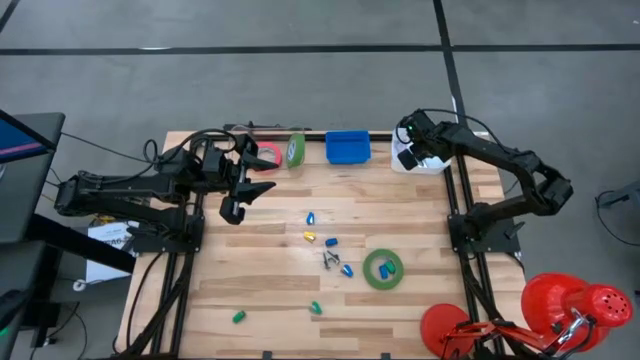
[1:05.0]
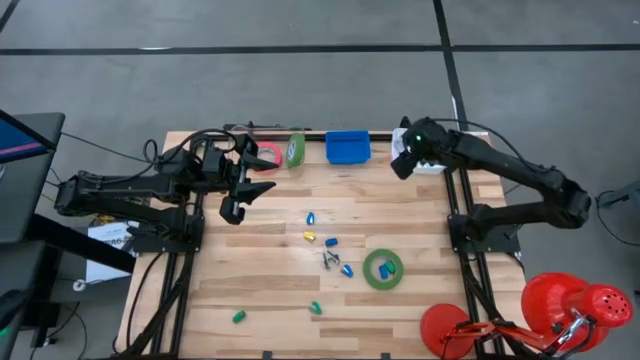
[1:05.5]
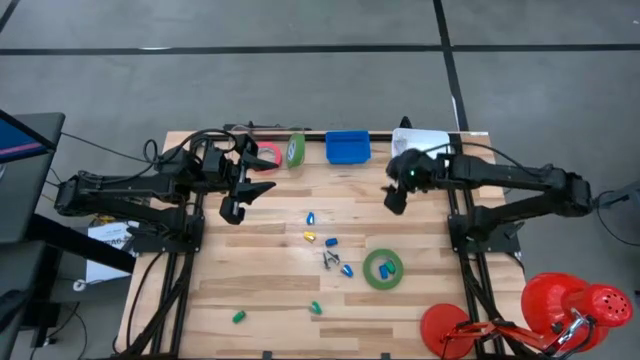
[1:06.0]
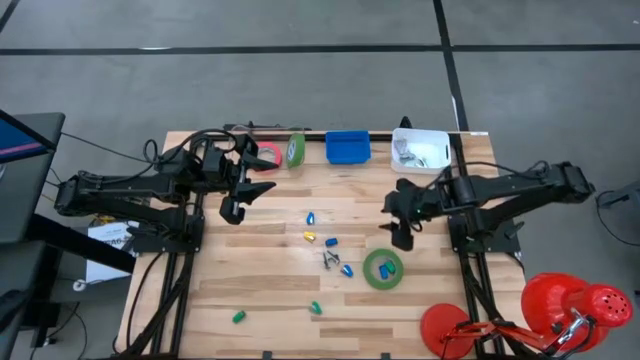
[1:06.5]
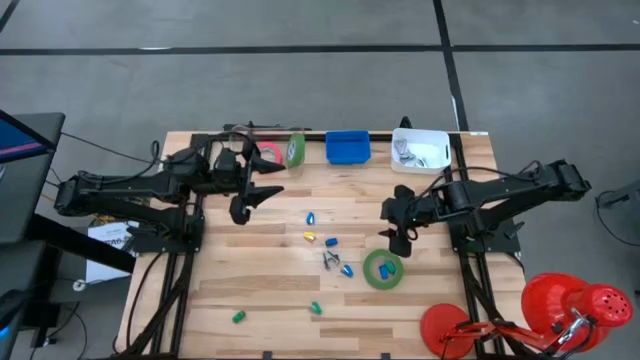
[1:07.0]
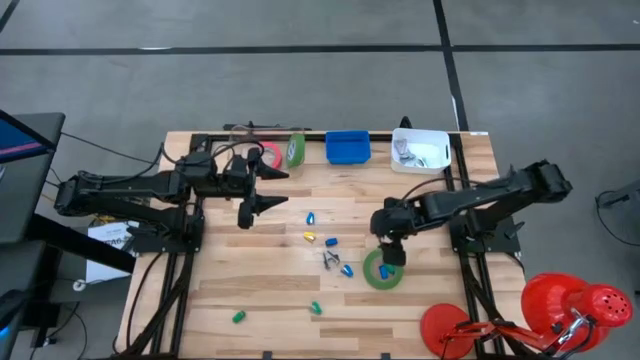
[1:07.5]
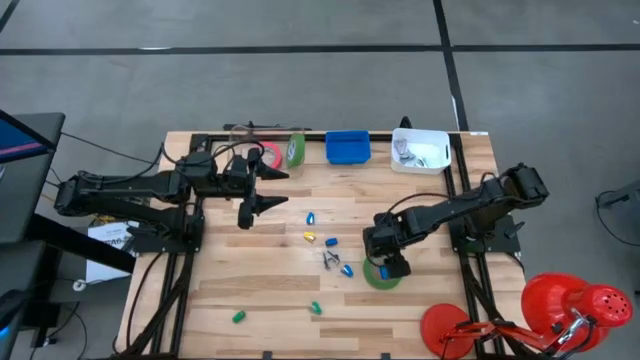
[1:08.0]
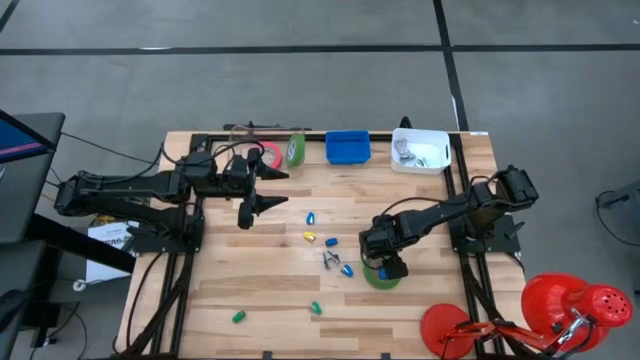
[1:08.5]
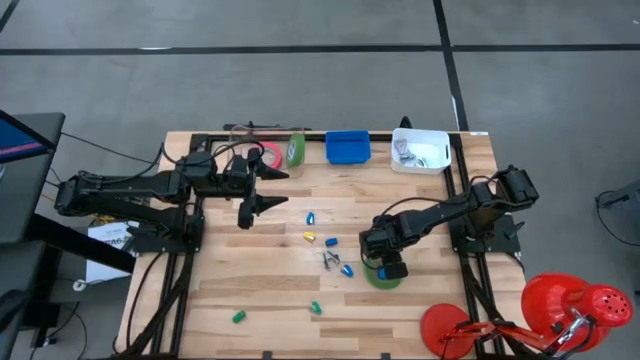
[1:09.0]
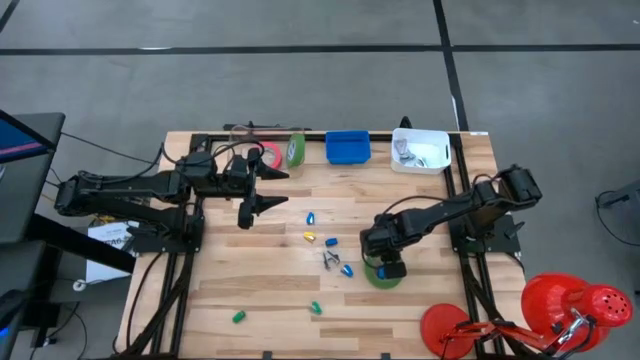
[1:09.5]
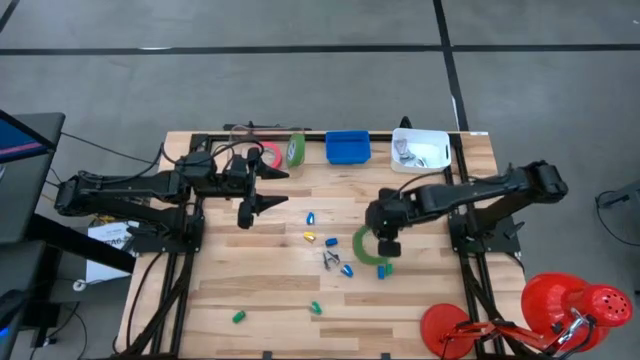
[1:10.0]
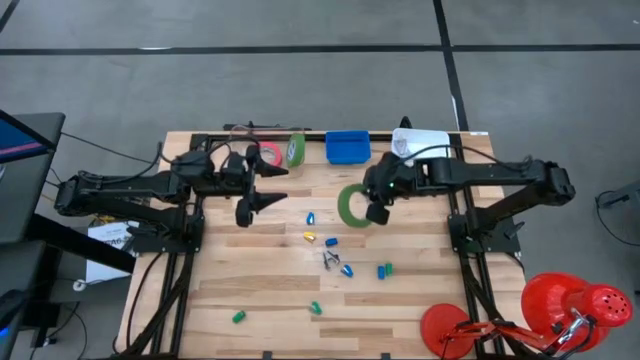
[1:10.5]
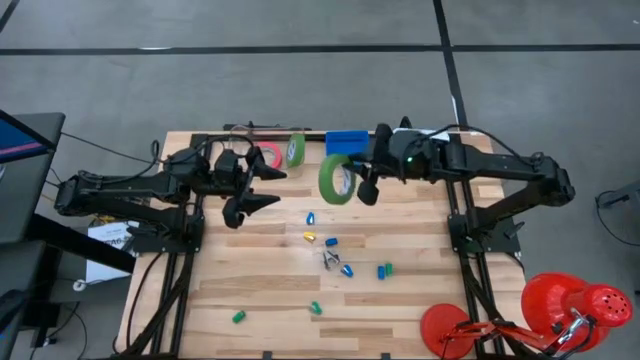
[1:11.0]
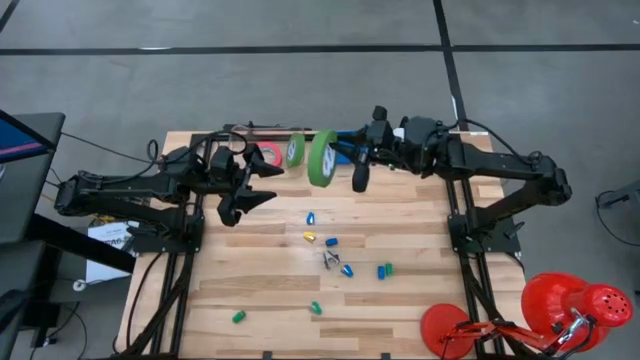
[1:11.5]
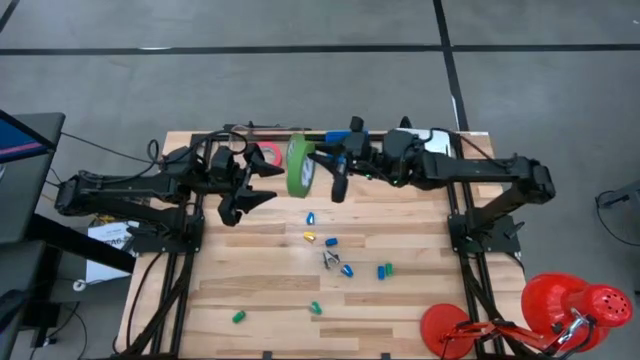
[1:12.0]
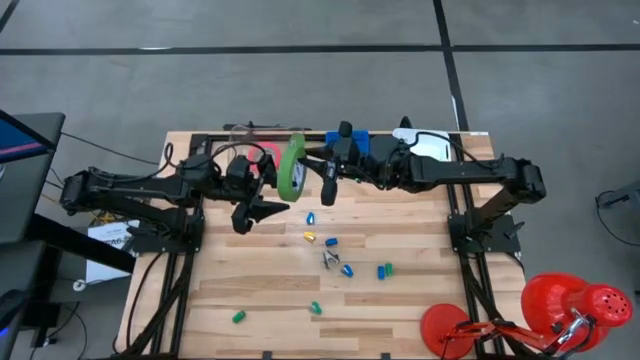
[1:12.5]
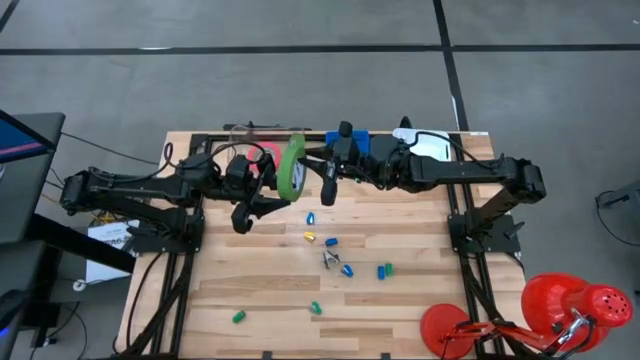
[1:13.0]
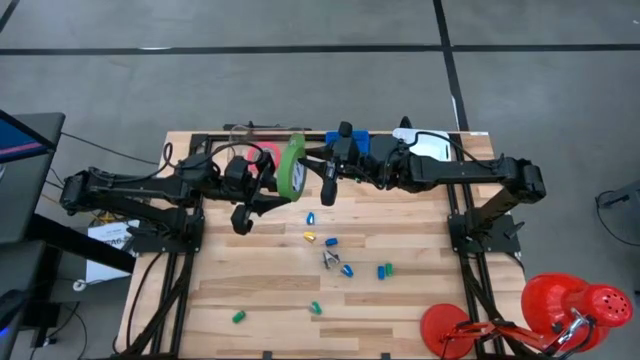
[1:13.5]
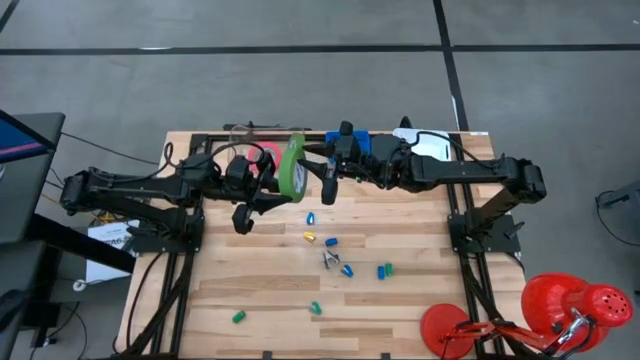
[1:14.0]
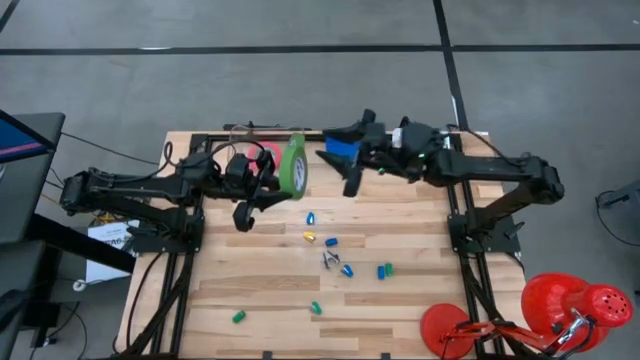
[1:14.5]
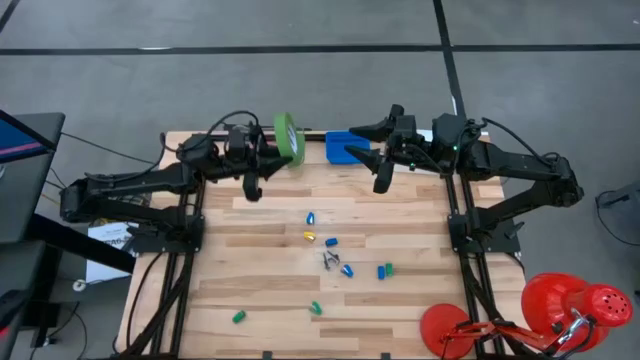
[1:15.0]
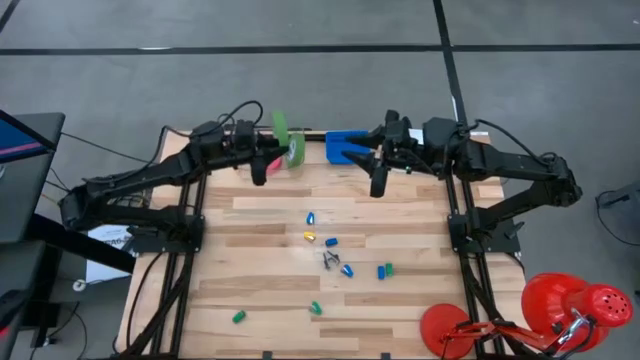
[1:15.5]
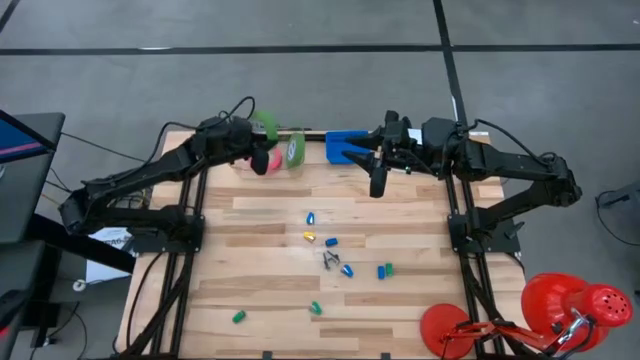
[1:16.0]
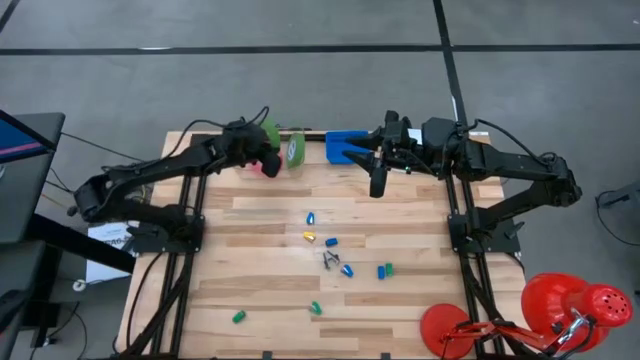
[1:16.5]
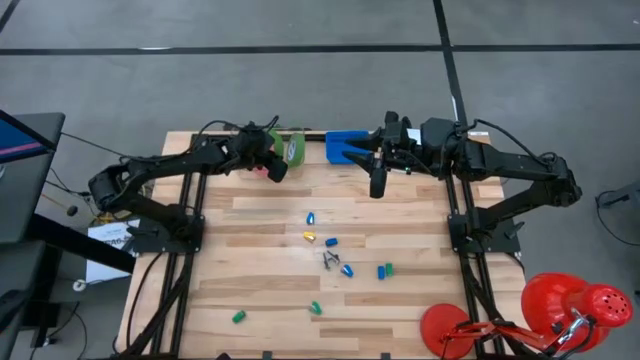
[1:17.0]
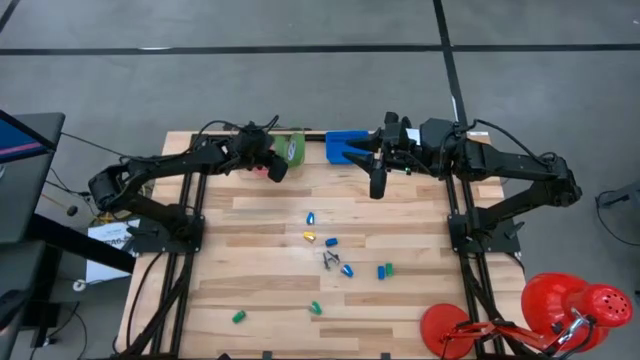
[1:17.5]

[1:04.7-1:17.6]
Task: Pick and place Stapler, Stapler remover, tape
Put the green tape into the transparent bin

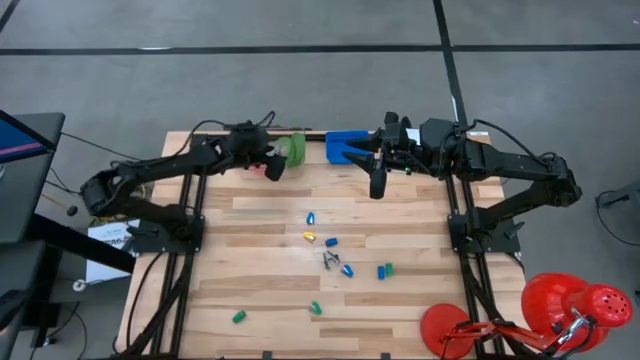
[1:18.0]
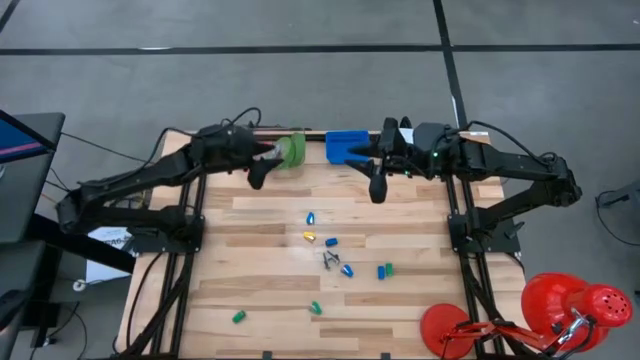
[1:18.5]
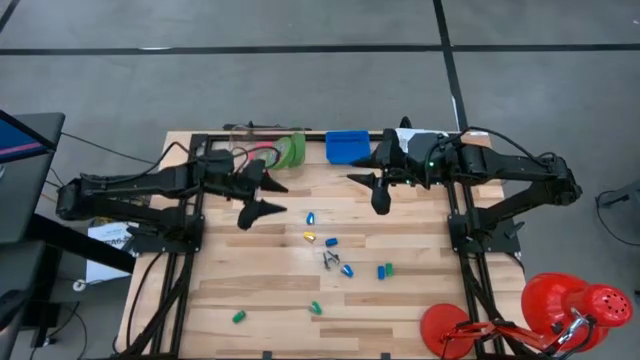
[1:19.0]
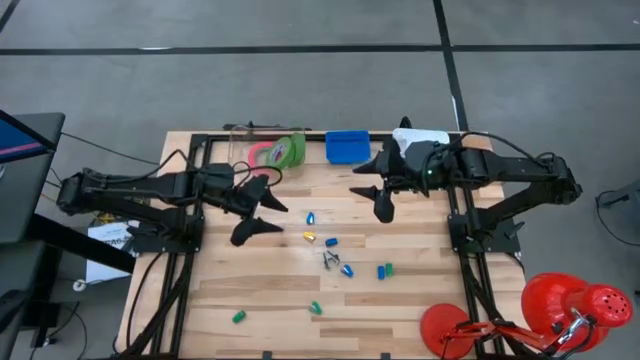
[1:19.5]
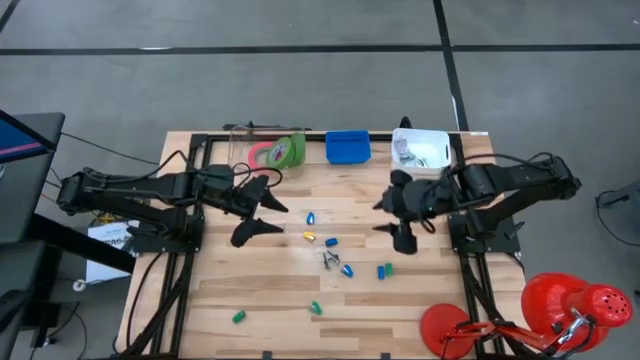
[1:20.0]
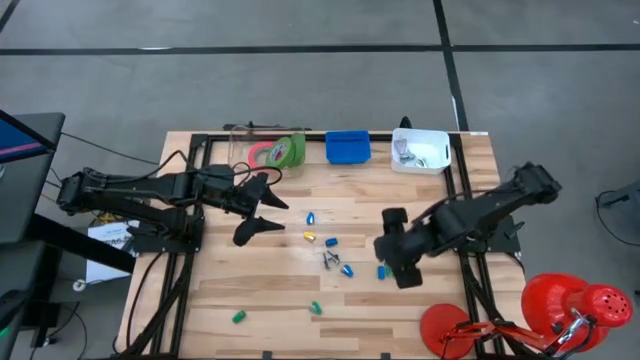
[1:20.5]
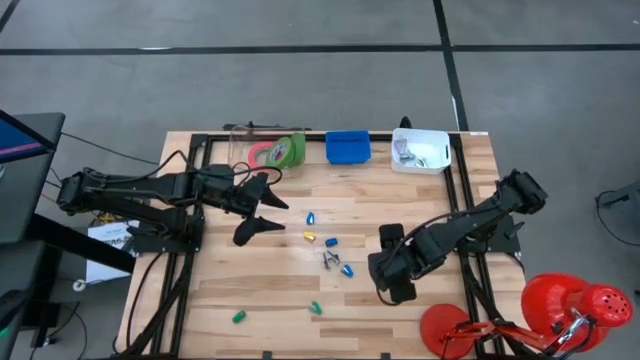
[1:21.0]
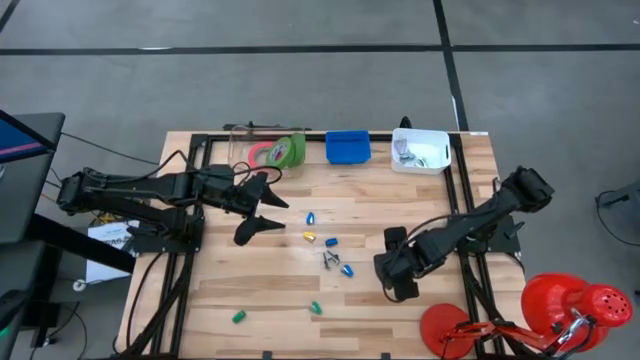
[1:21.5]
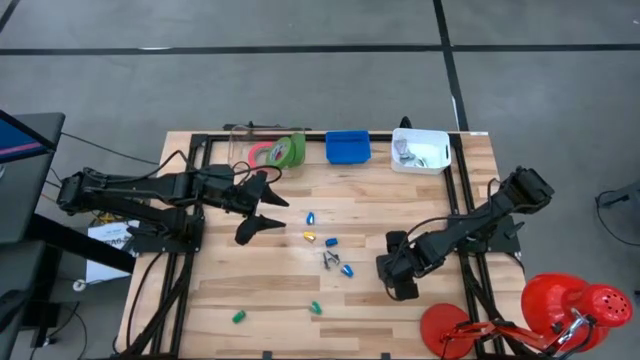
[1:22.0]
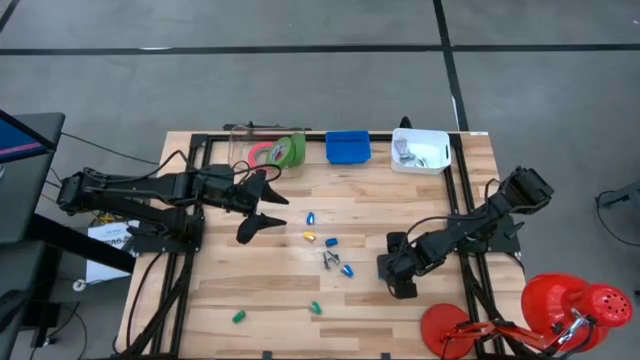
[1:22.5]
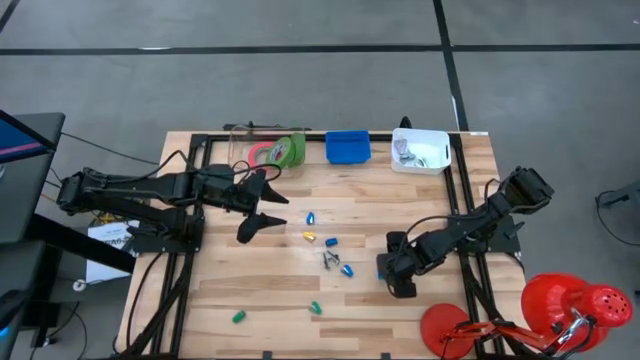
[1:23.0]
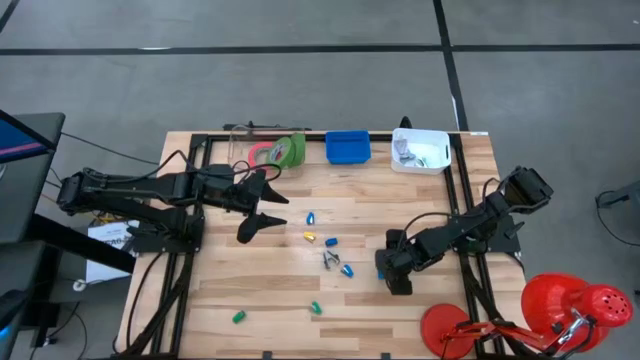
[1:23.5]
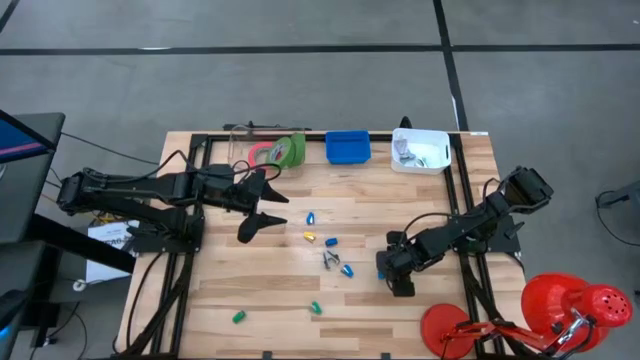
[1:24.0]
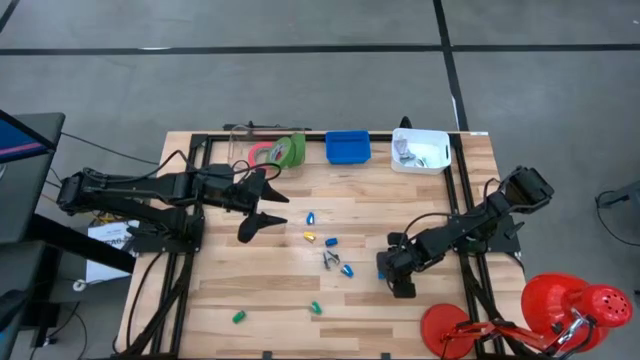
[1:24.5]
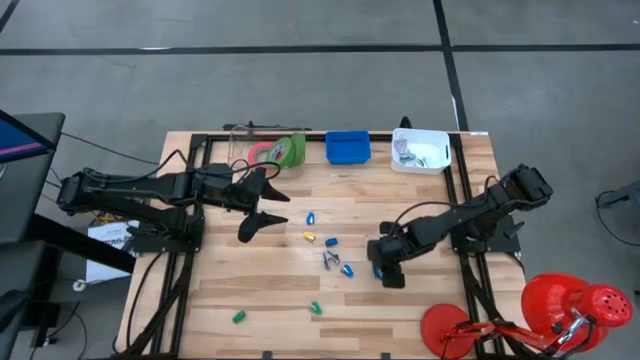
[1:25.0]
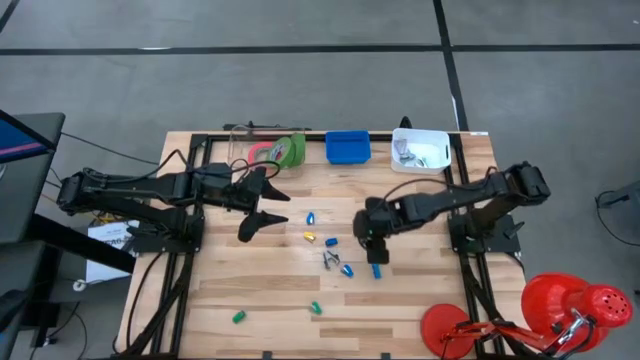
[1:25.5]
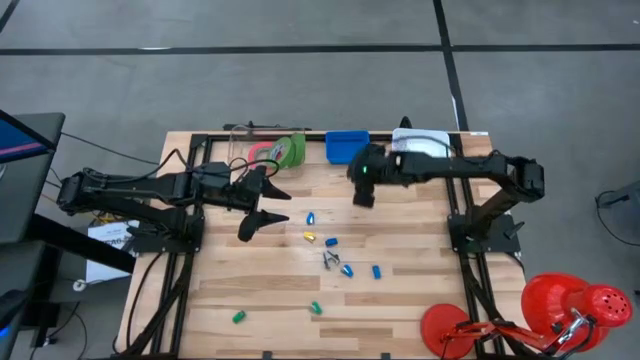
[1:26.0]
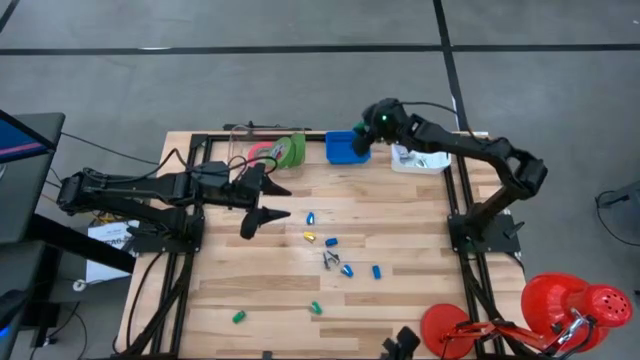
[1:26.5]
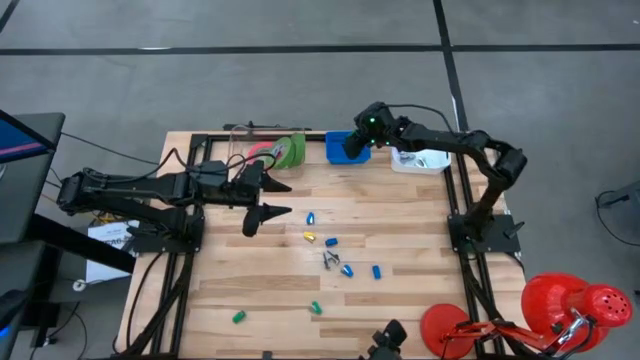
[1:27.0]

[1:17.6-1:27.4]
Put the green stapler into the blue bin
